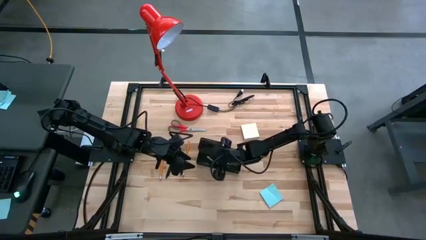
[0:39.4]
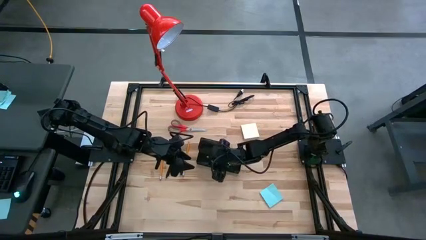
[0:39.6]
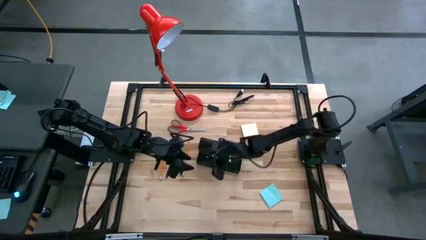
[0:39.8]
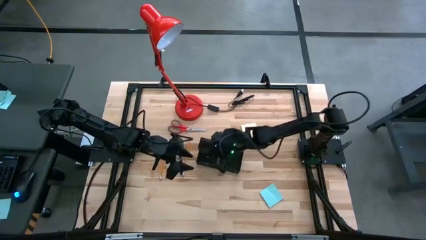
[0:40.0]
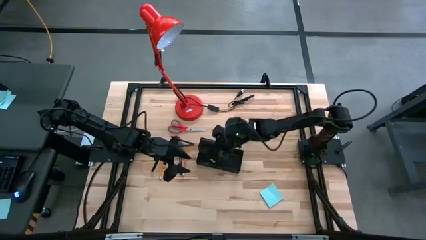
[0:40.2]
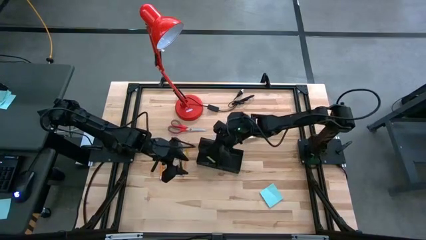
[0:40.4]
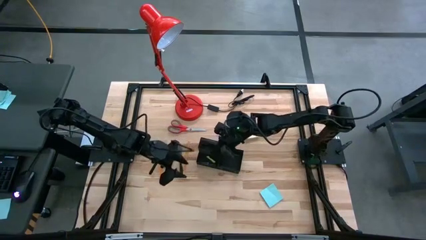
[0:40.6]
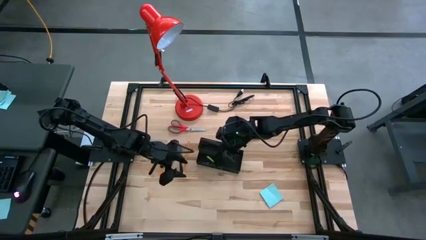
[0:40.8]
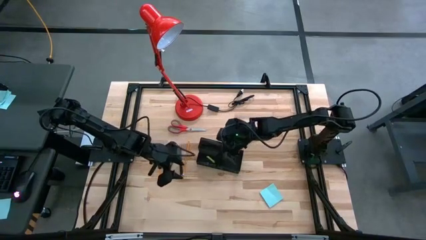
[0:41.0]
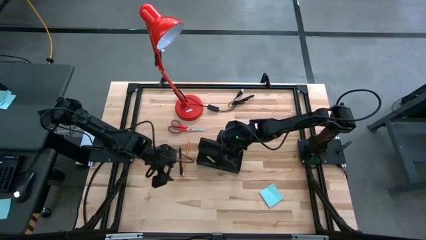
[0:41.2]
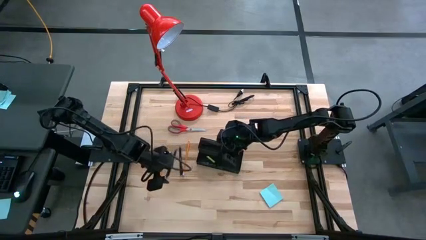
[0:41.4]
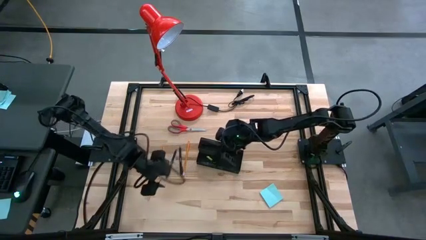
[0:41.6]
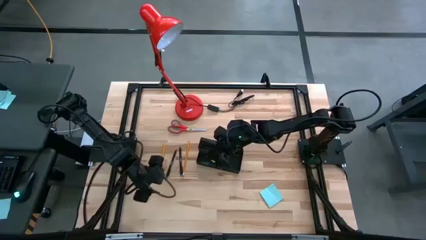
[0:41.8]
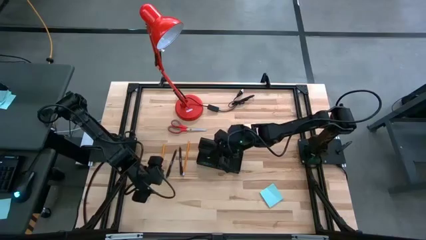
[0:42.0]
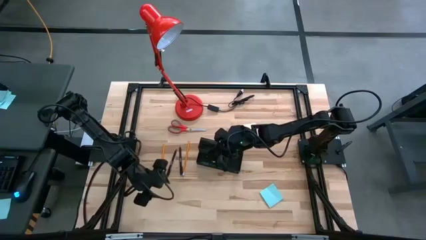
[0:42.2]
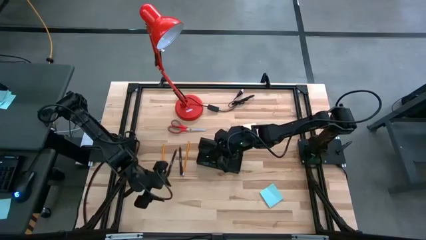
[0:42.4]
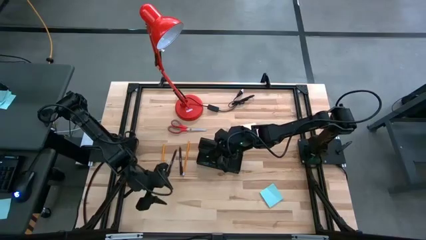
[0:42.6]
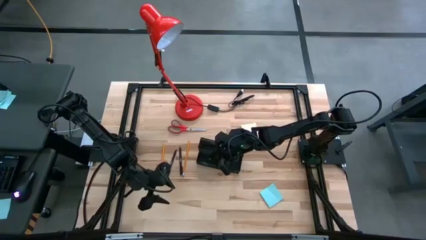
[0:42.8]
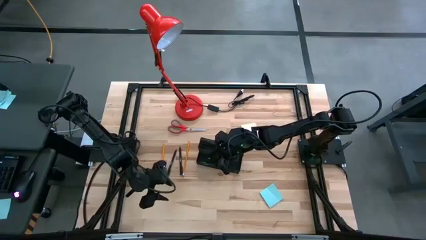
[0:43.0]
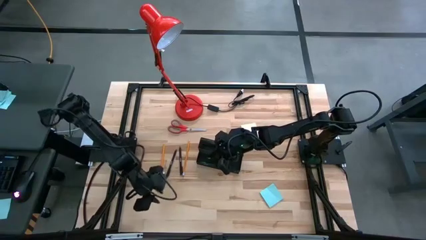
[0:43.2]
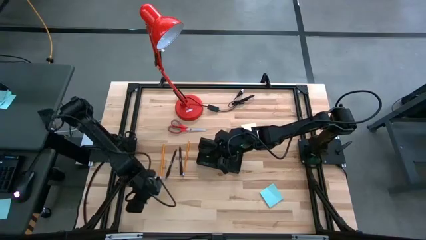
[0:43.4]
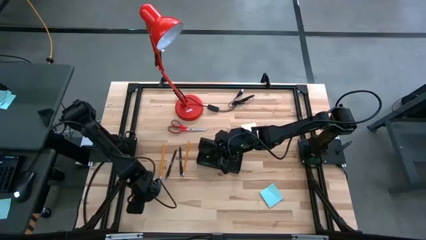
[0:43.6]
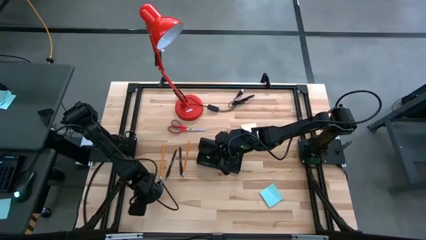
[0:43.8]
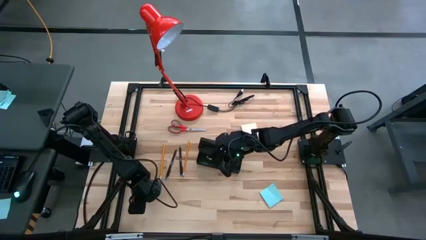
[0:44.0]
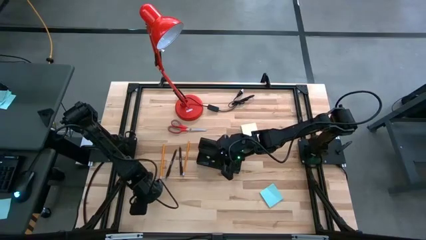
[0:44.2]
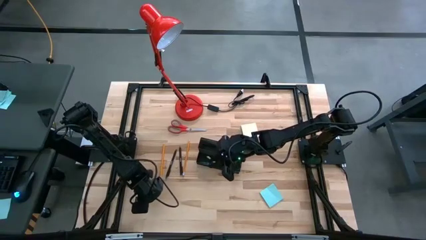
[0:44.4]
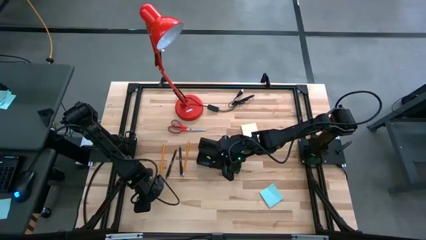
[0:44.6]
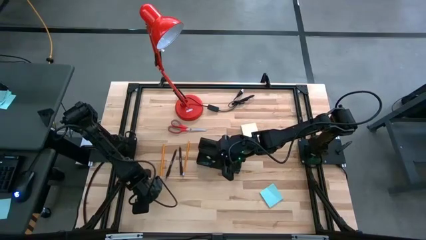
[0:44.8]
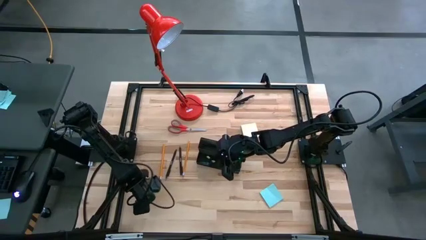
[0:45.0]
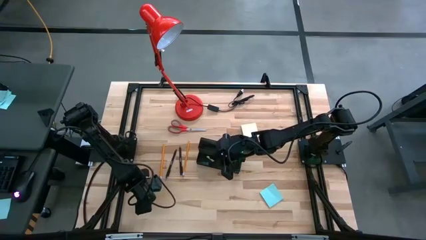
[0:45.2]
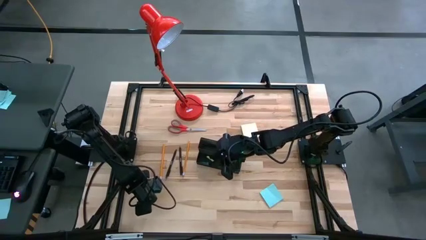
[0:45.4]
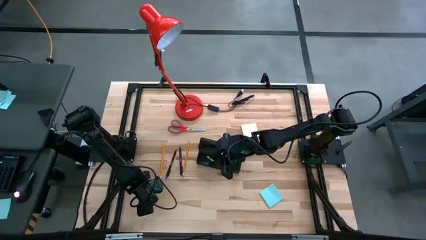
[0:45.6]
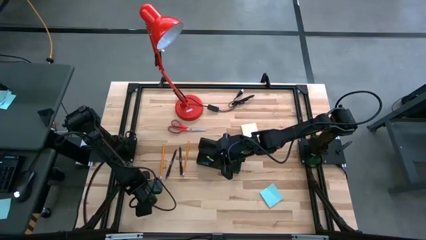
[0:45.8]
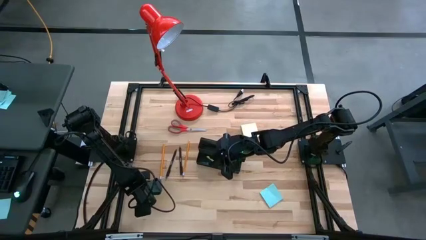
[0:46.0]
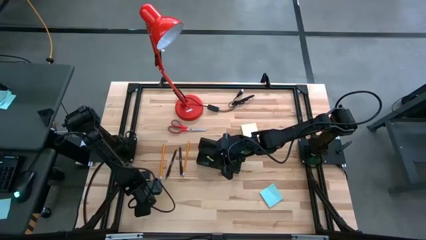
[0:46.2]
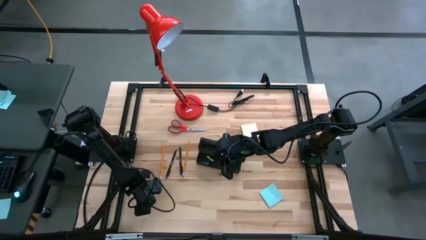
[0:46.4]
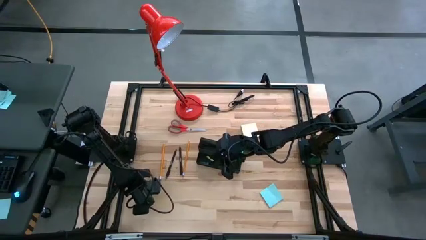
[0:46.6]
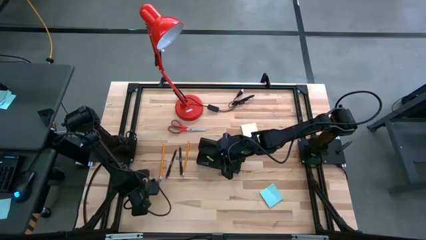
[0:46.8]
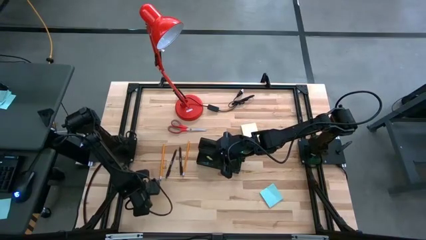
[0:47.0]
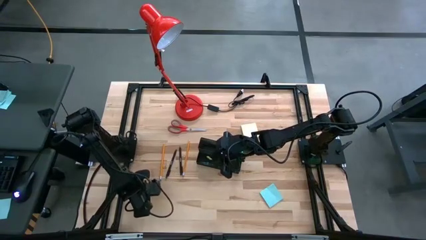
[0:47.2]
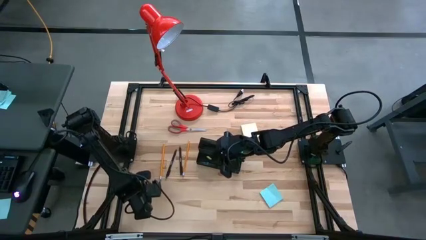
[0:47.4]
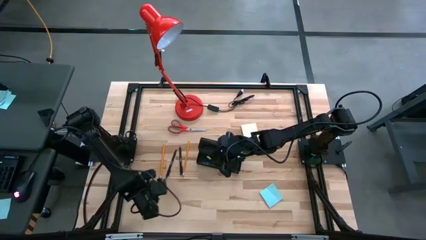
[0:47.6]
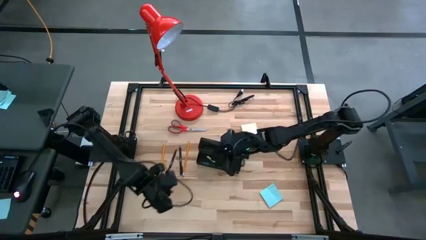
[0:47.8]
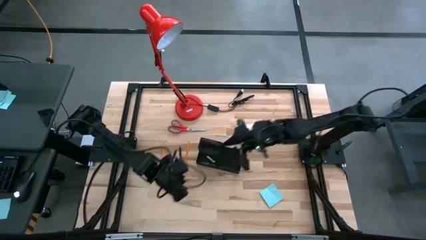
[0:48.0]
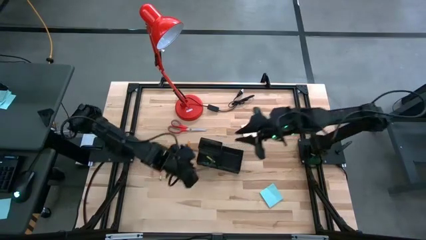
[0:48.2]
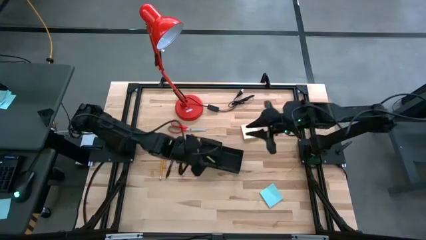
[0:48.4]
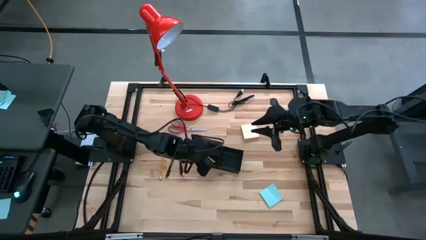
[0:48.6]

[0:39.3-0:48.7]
Task: Pick and place office supplies into organizer
Put the pink binder clip into the black desk organizer

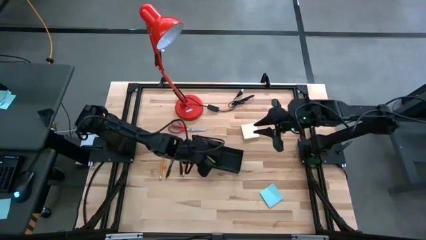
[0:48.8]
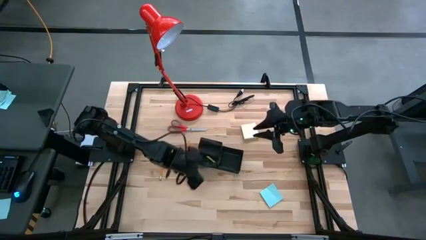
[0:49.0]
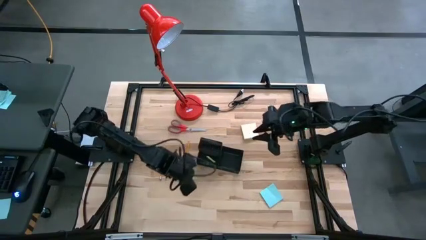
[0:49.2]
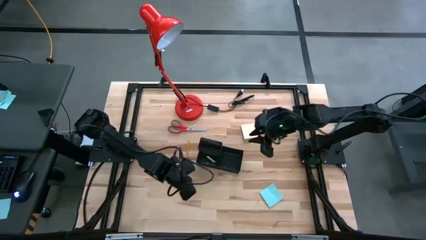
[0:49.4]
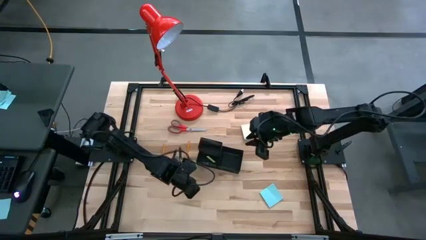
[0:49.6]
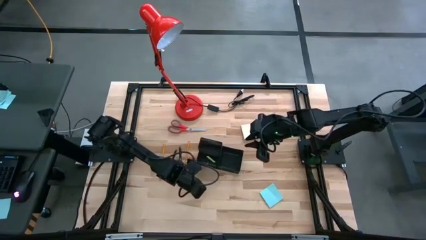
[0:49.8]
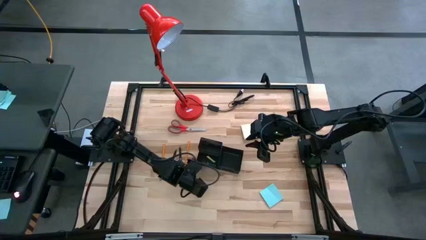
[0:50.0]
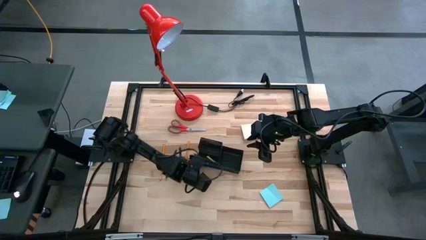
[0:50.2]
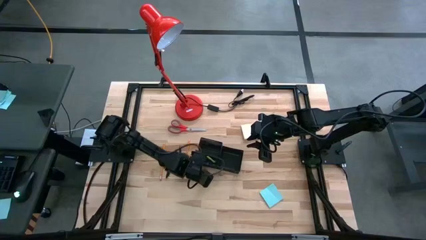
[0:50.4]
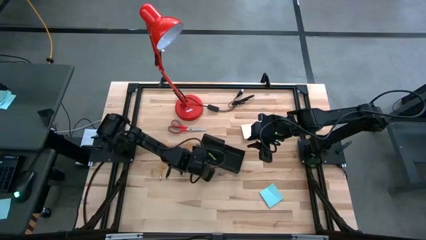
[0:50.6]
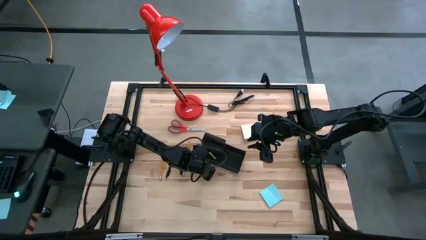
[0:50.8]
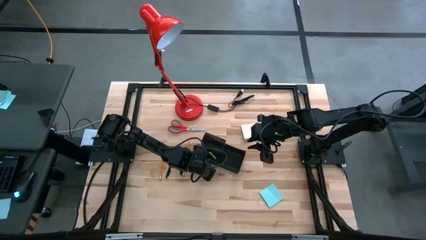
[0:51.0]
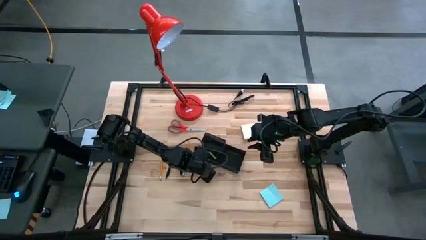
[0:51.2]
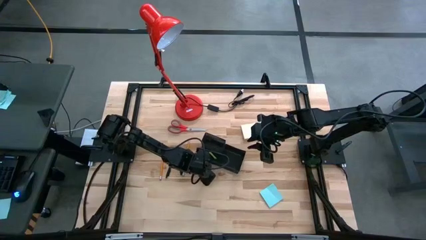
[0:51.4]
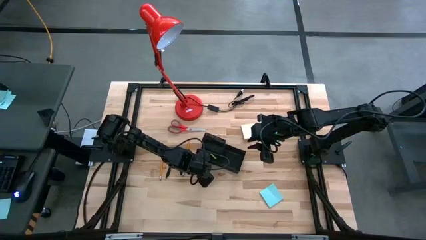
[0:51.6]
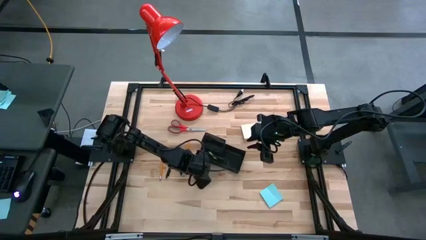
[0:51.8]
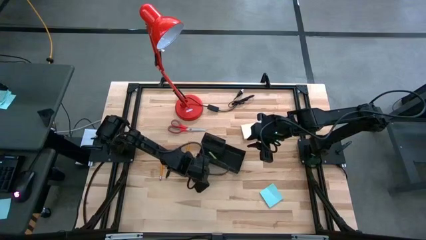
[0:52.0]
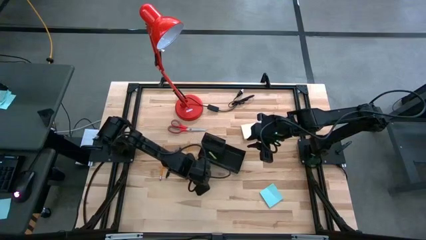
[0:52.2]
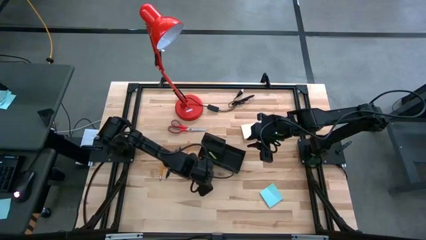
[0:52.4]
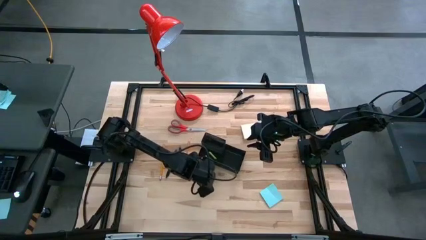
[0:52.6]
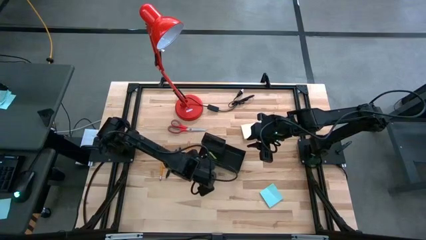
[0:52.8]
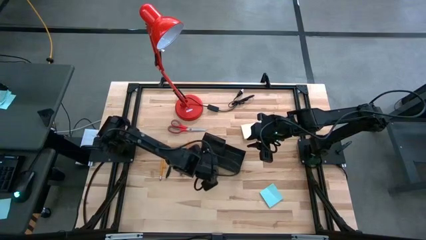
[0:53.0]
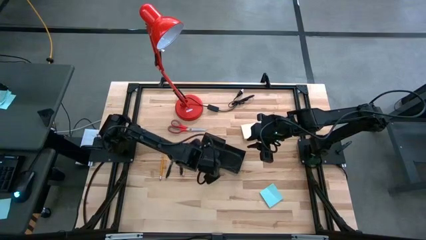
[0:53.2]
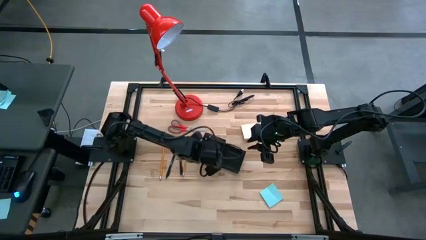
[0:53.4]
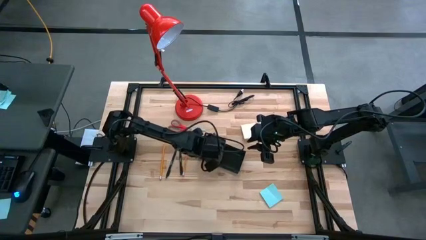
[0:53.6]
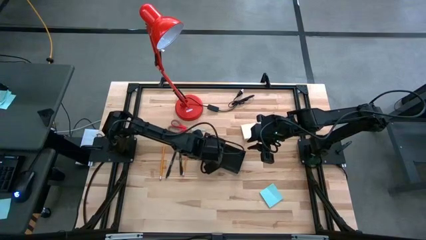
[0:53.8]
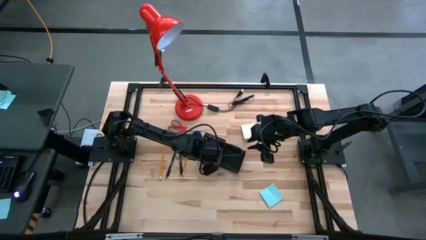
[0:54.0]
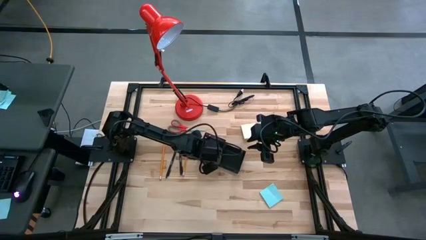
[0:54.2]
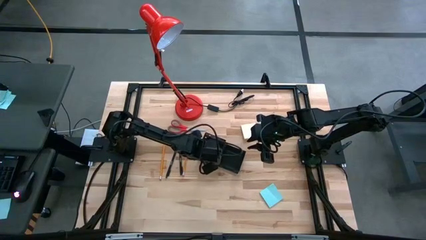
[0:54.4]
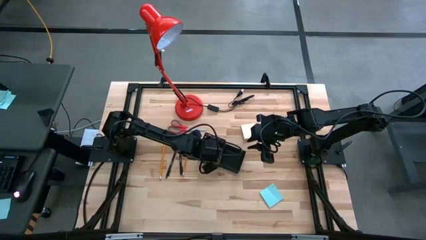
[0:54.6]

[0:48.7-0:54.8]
Put the pink binder clip into the black desk organizer

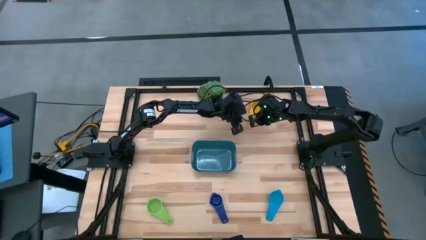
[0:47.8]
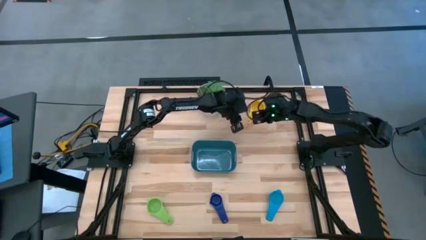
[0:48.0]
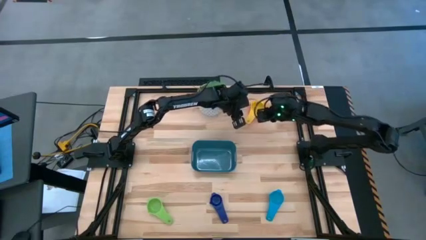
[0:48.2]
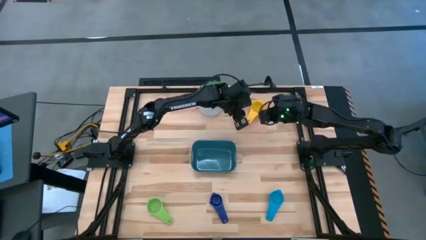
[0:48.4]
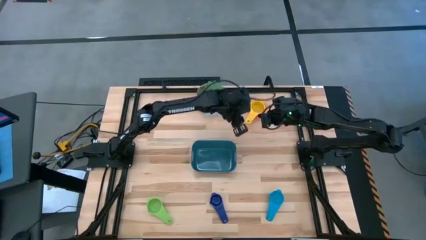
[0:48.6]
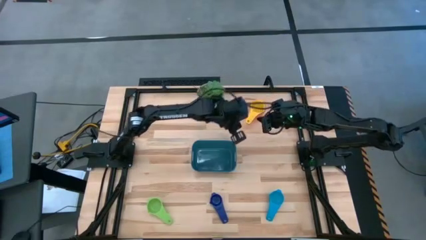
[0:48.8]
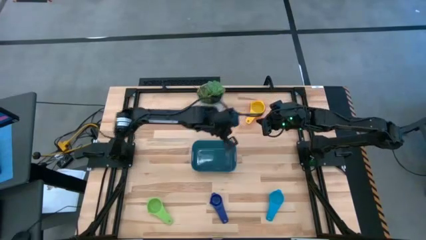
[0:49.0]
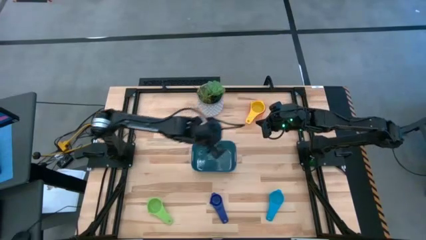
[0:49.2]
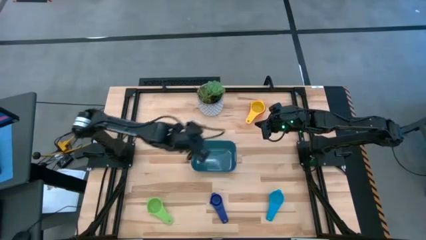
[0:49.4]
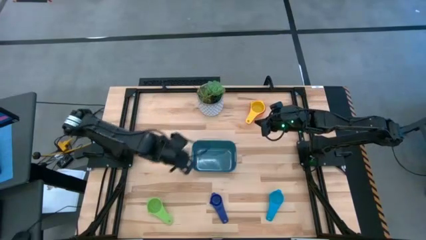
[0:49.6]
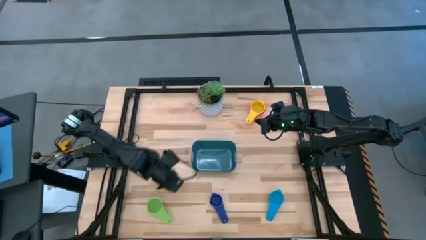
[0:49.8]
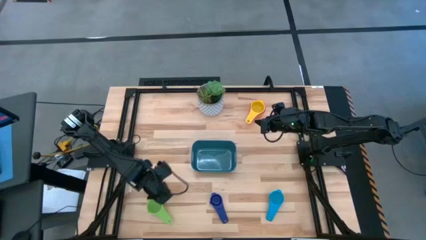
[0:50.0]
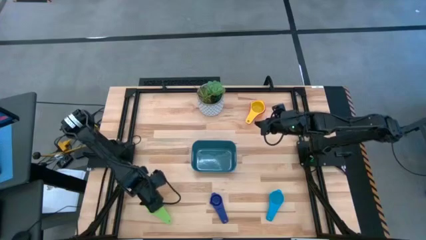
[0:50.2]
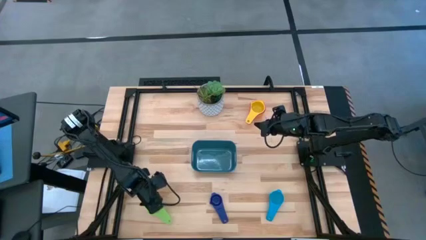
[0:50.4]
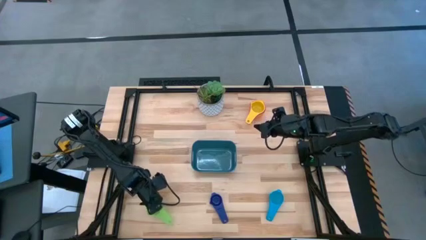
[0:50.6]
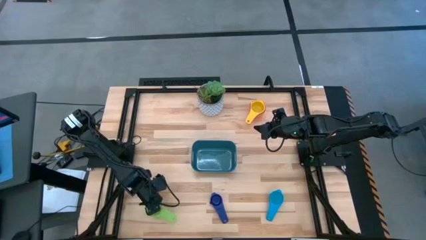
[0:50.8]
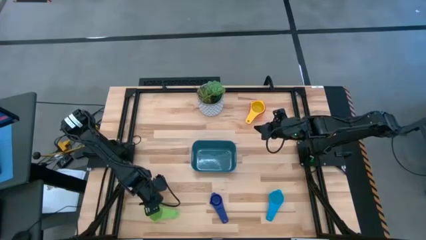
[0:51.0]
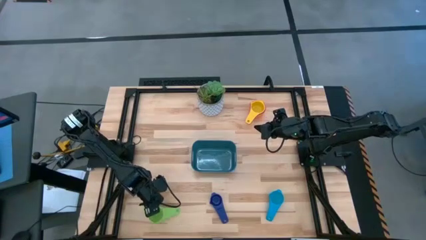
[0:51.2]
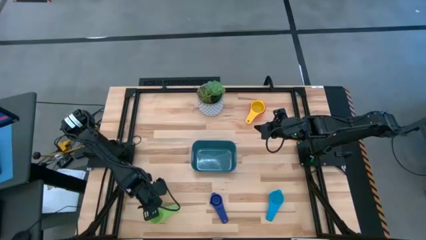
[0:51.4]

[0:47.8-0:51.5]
Task: Nest measuring cups in basket
Stack the green measuring cup on top of the yellow measuring cup
